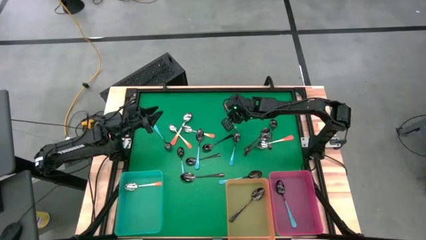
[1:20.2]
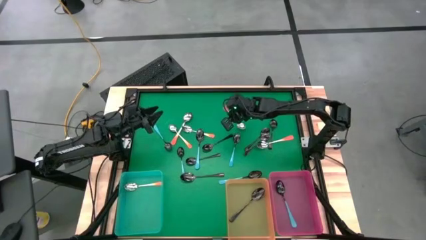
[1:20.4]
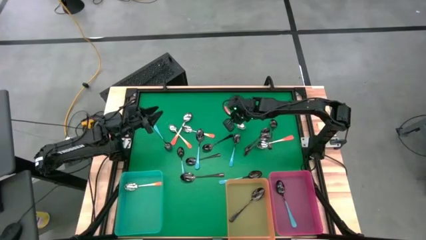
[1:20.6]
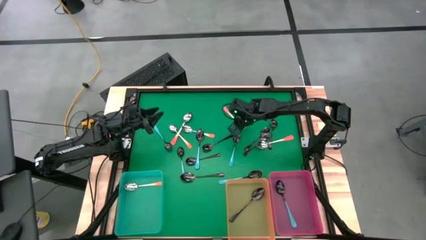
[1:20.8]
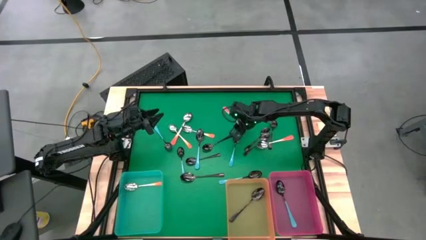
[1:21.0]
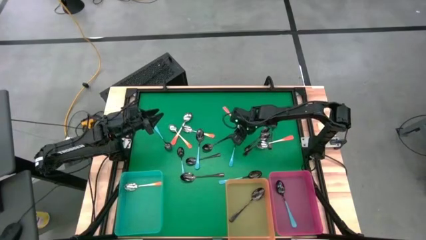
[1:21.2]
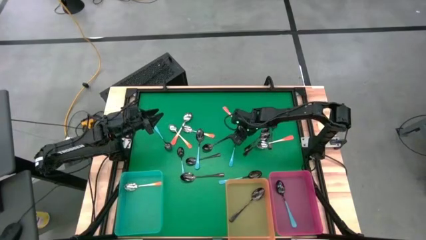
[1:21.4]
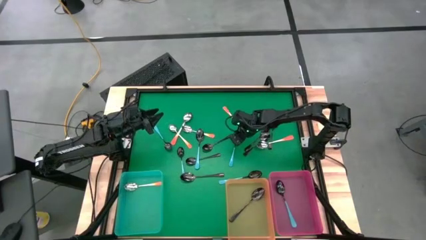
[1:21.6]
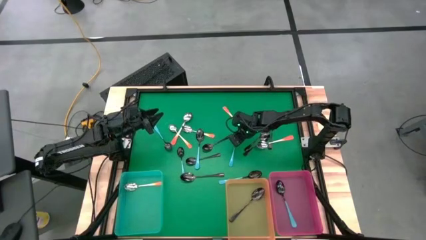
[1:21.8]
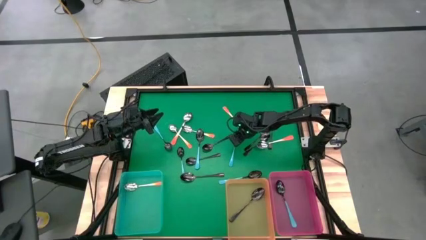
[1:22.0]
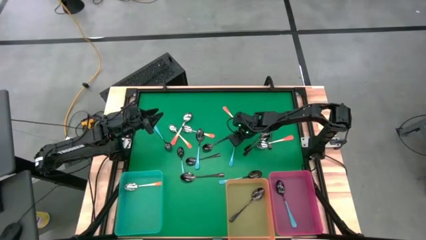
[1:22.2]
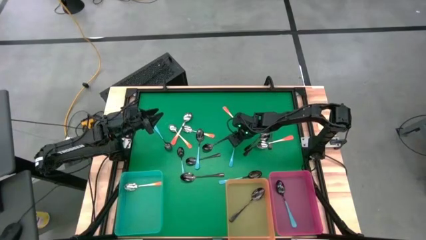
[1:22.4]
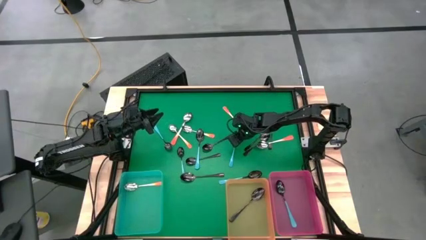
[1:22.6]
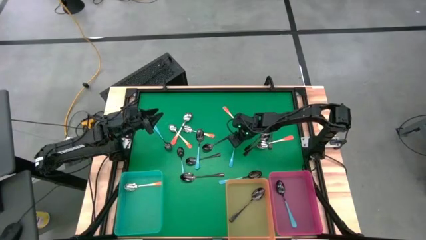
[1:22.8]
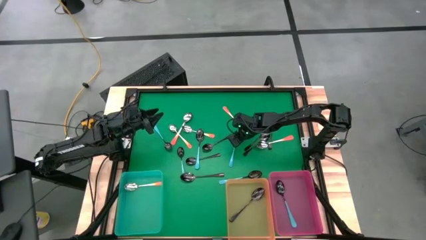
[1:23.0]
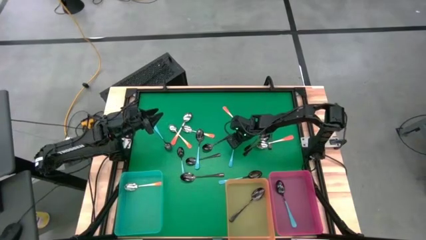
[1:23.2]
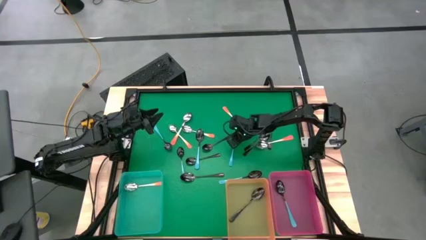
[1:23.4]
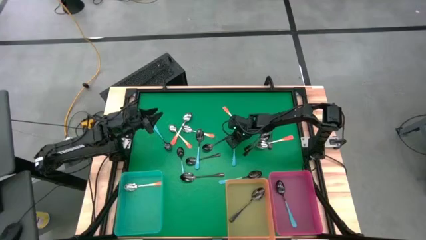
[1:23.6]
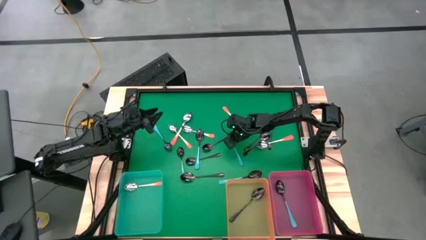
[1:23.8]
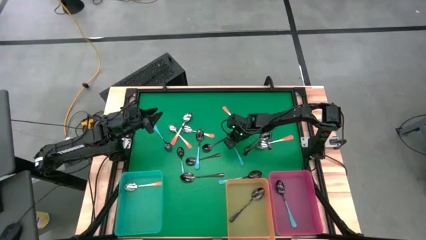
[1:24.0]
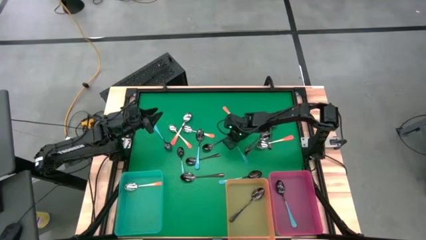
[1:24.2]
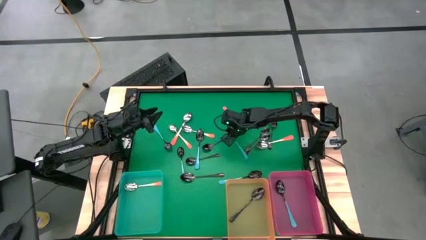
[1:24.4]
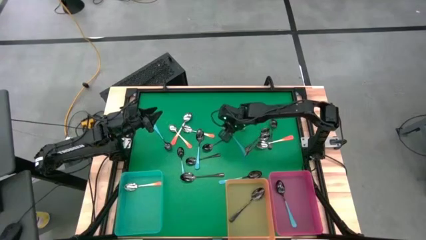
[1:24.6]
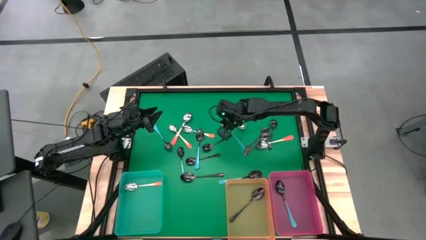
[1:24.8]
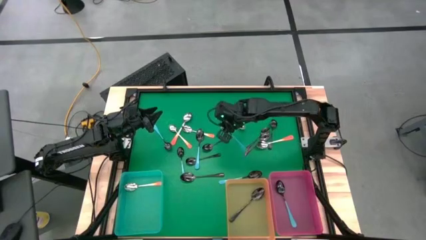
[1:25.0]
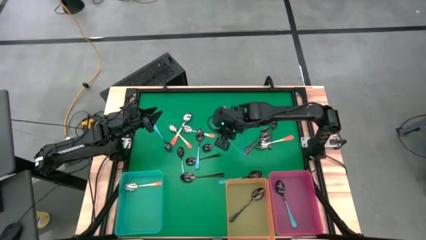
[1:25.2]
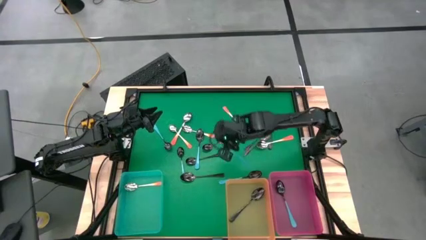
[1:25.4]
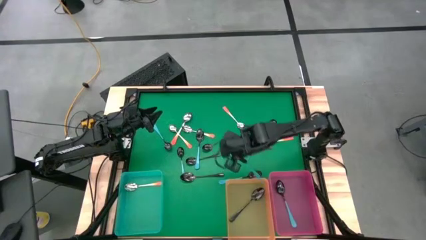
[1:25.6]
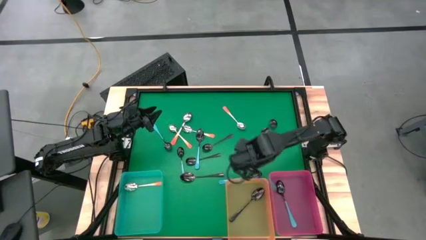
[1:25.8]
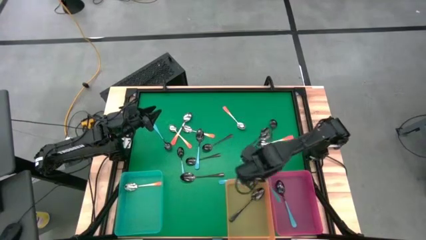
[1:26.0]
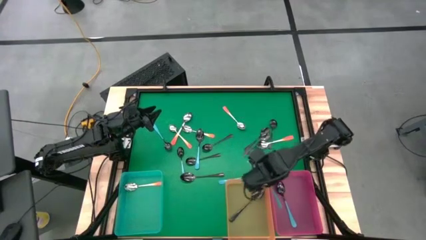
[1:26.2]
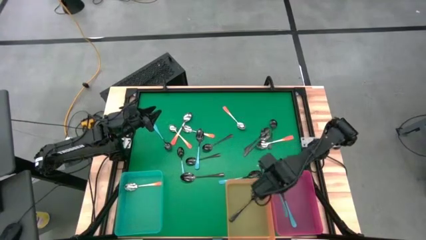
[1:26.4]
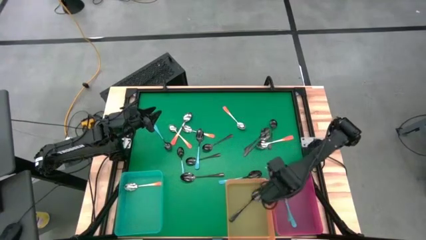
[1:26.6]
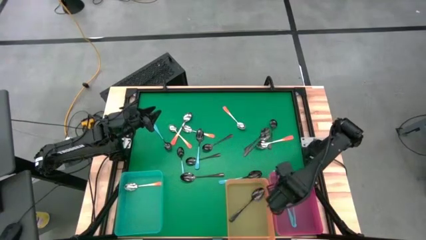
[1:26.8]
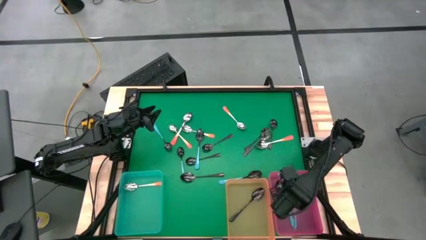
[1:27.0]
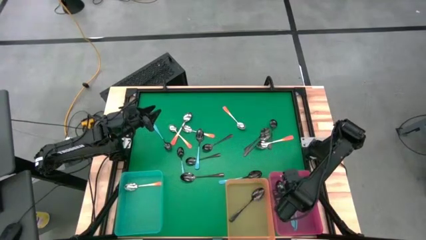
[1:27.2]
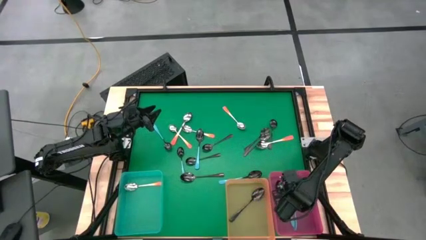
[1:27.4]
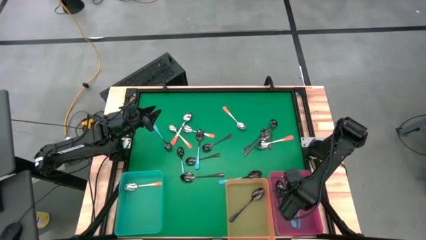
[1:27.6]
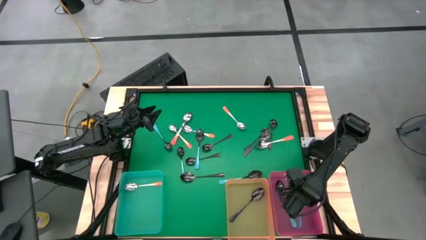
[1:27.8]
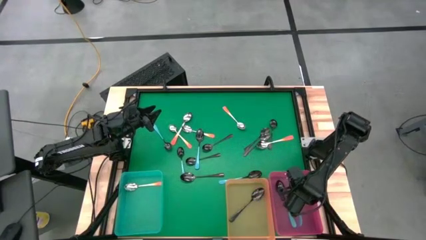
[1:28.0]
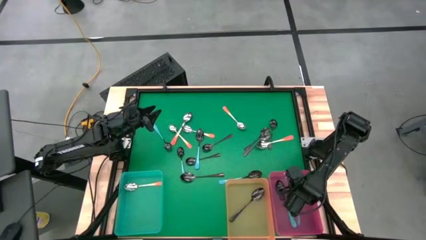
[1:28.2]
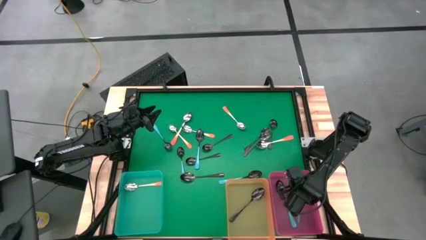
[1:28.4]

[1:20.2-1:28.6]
Task: Sort silverware by color (type)
Put the blue spoon into the pink bin

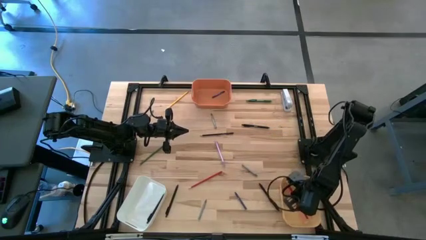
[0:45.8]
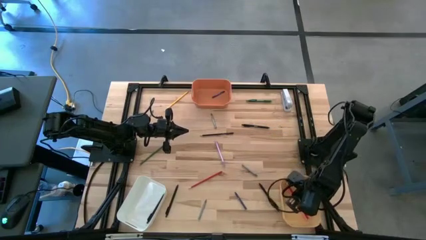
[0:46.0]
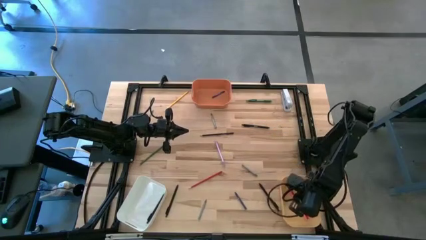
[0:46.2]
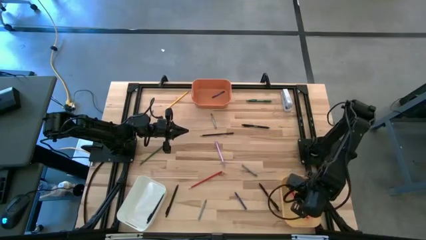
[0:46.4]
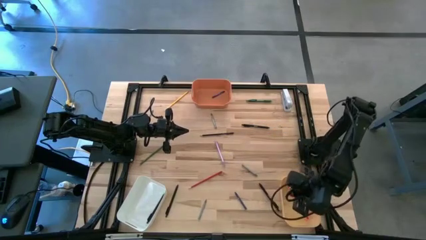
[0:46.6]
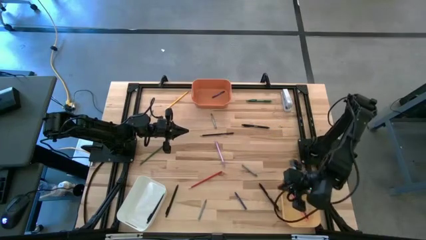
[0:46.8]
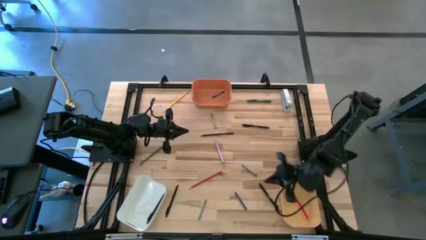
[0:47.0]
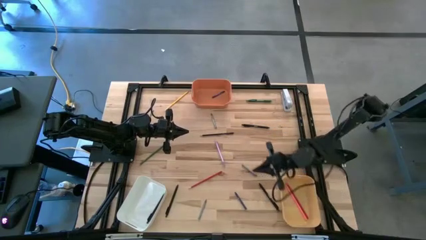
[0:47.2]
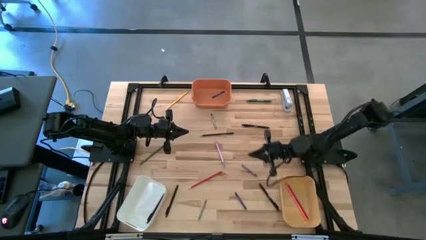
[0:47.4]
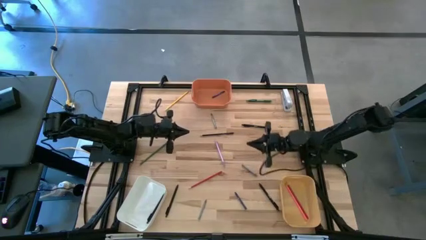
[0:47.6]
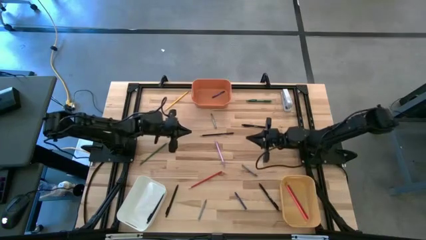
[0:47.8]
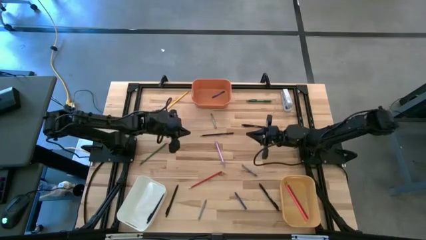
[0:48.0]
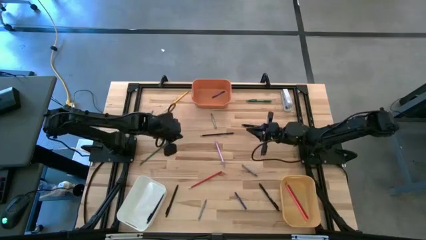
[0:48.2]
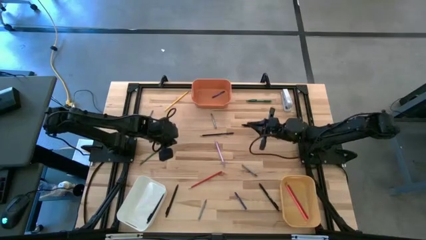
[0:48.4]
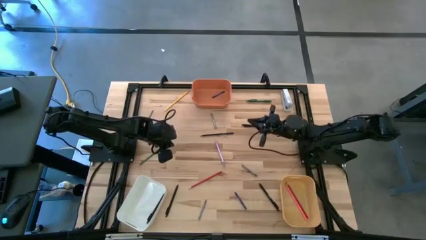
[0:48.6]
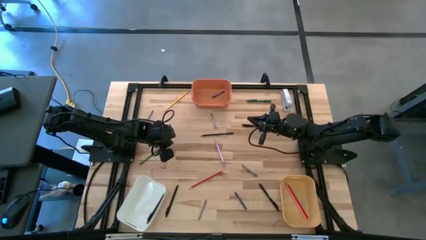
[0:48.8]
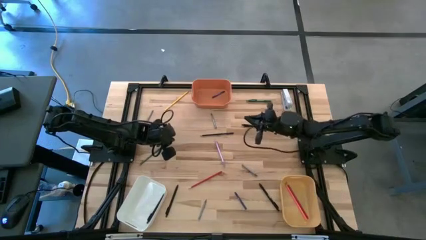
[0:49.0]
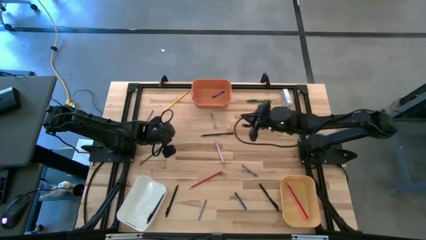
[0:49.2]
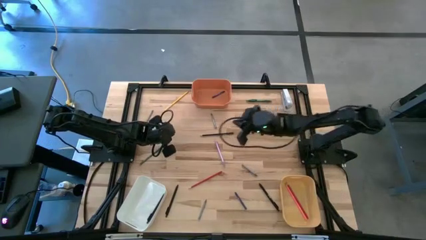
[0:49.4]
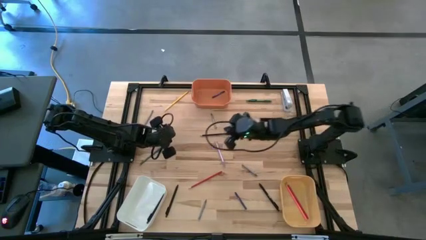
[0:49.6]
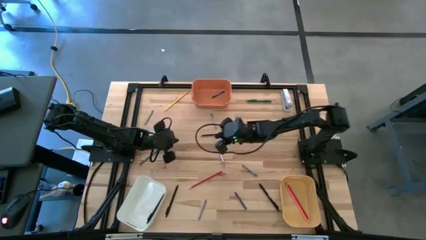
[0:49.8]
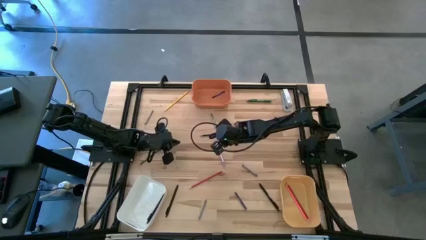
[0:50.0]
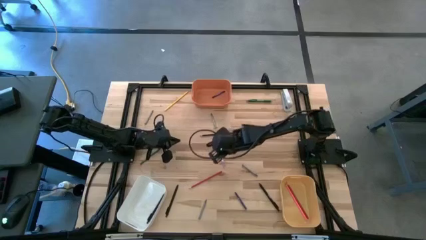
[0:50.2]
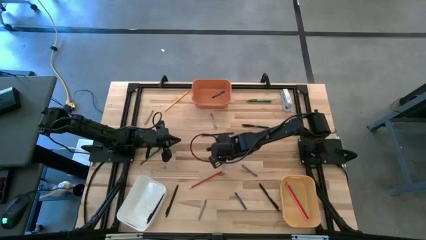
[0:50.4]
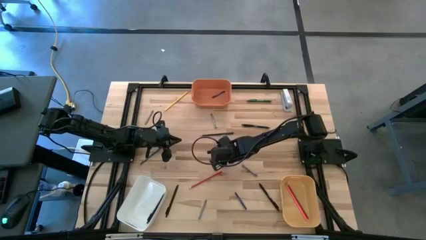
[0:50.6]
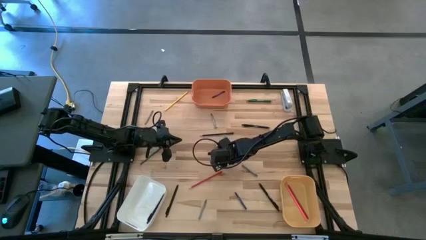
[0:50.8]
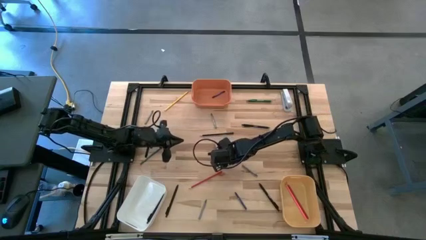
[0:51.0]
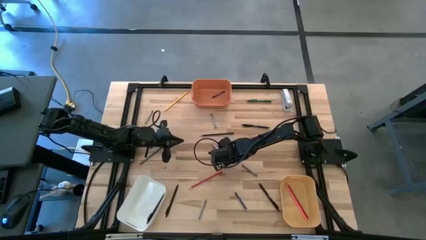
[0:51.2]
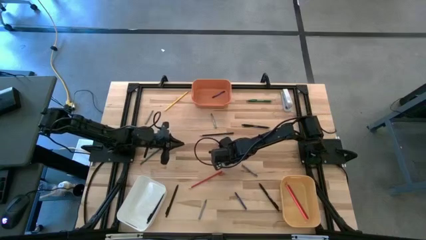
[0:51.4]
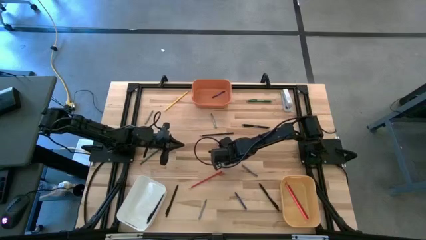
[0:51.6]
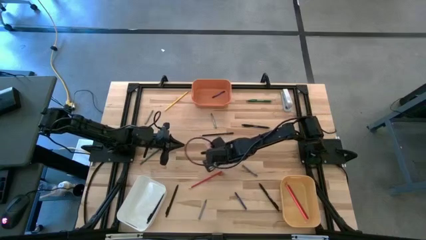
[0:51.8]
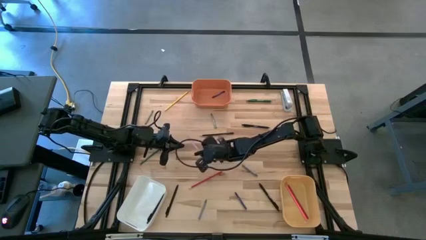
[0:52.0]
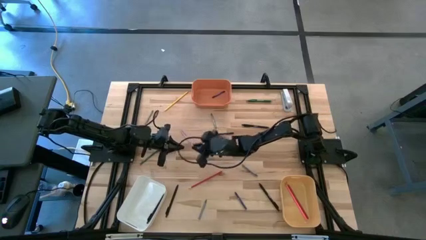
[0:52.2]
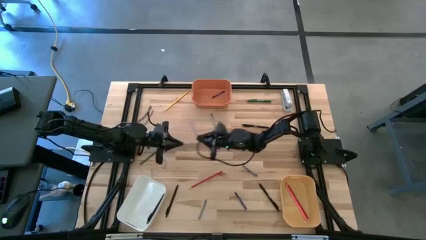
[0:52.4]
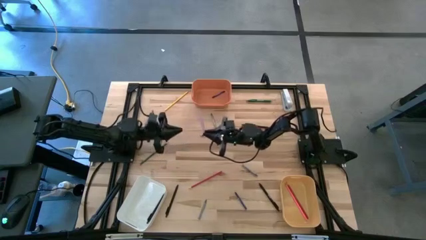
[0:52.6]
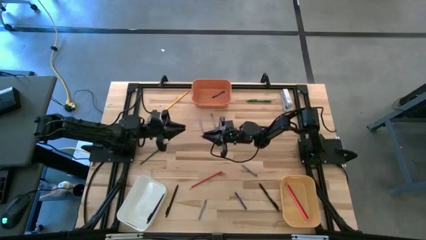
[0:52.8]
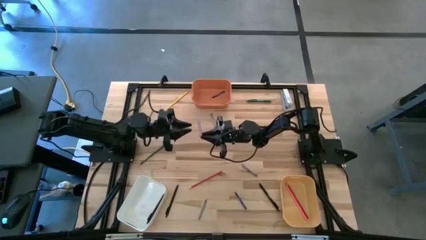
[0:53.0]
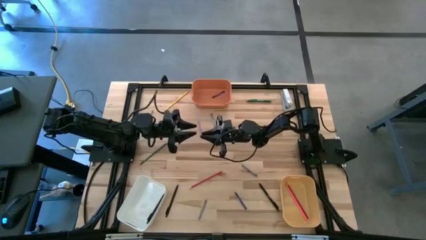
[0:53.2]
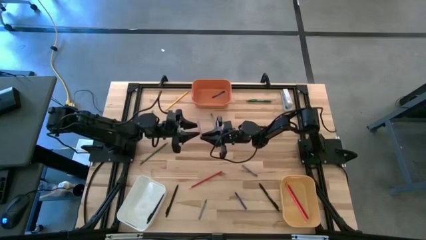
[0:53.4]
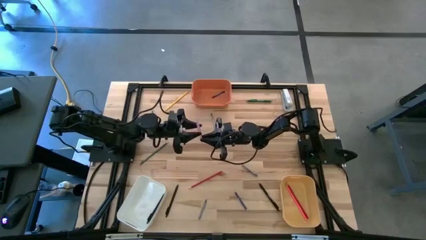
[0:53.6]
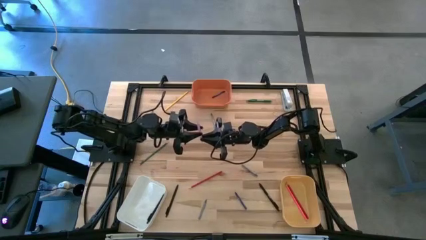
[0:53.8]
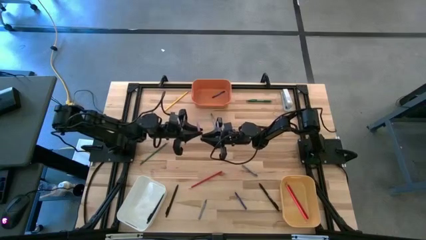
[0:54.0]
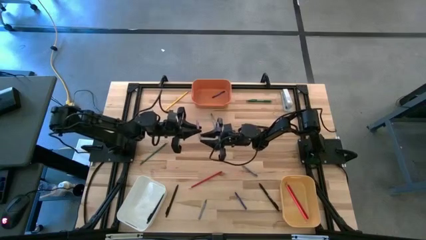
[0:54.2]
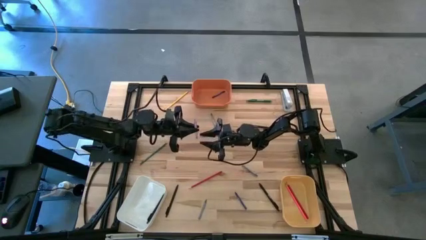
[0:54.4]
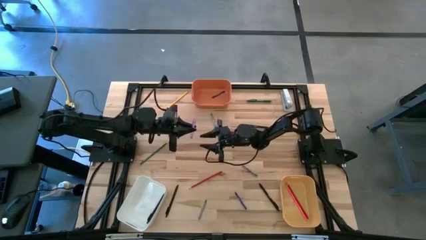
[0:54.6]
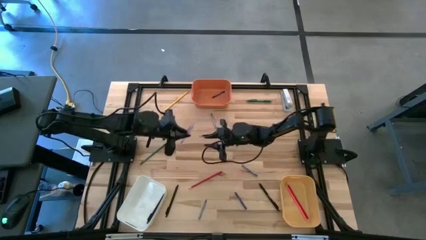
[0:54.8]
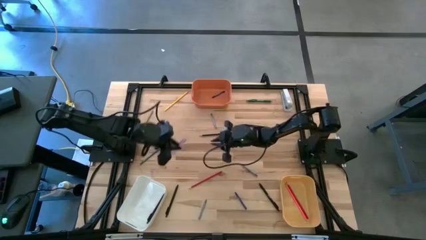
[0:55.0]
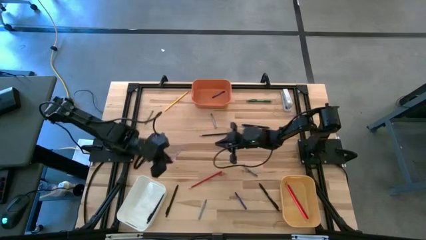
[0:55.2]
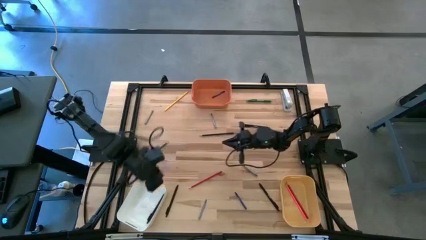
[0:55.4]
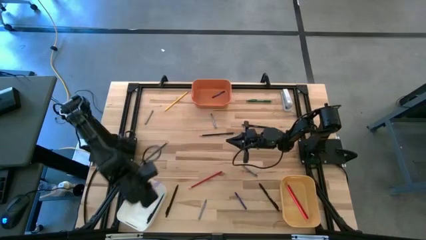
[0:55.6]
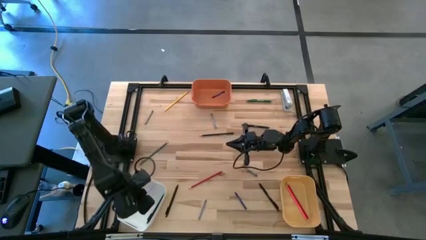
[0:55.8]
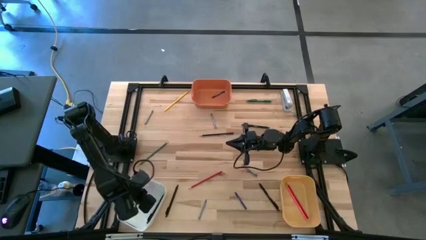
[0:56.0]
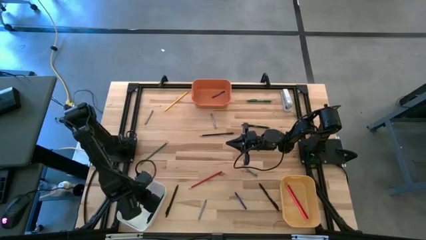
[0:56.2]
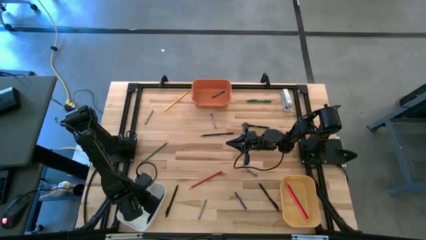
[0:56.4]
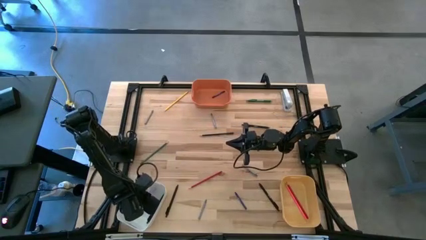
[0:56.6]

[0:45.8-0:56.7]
Task: Sort crayons/erasers/pens/pencils in bins
Put the violet pen into the white bin
